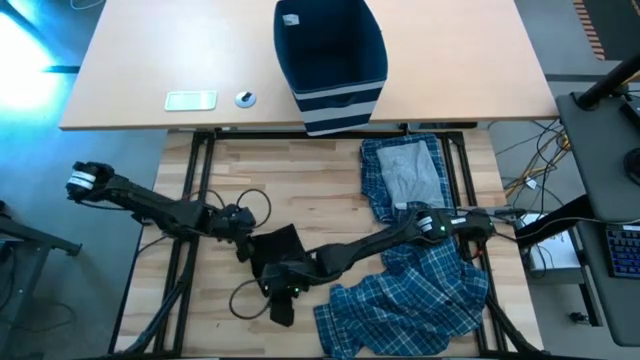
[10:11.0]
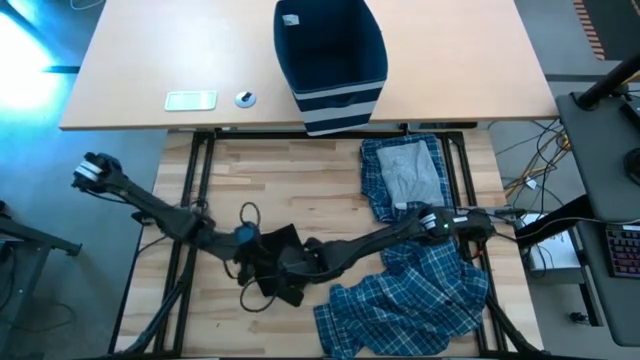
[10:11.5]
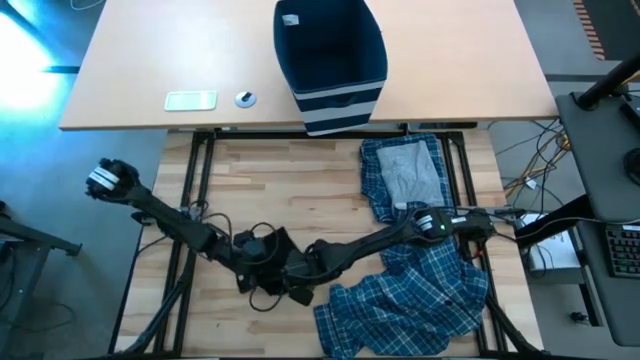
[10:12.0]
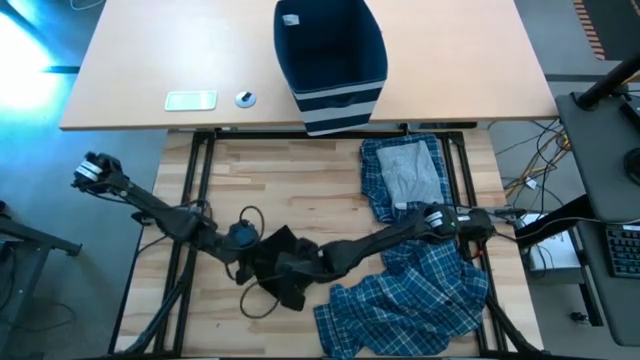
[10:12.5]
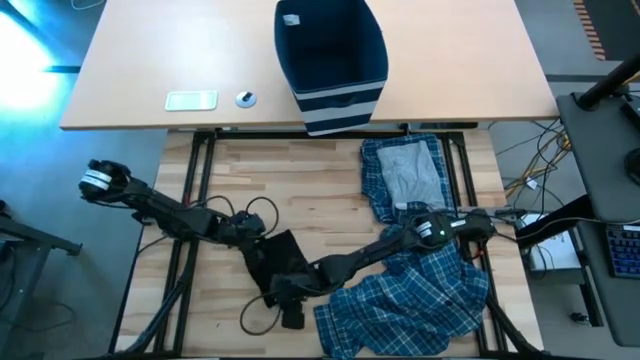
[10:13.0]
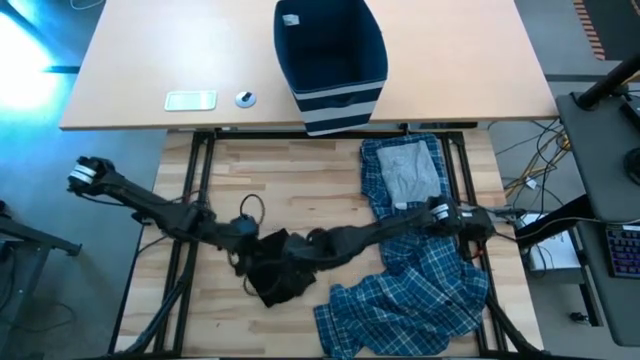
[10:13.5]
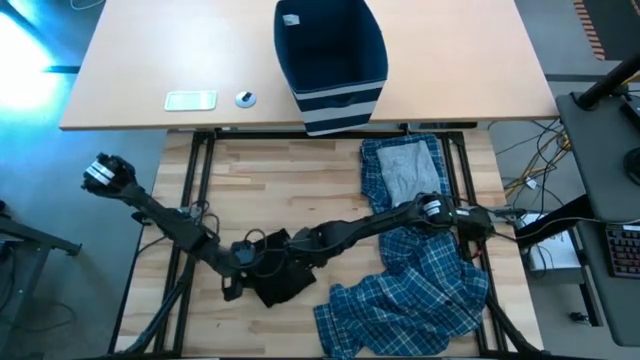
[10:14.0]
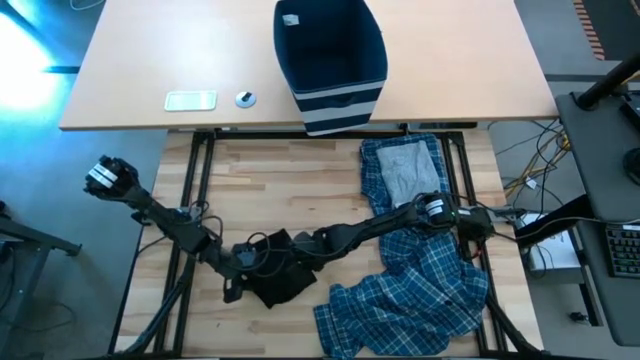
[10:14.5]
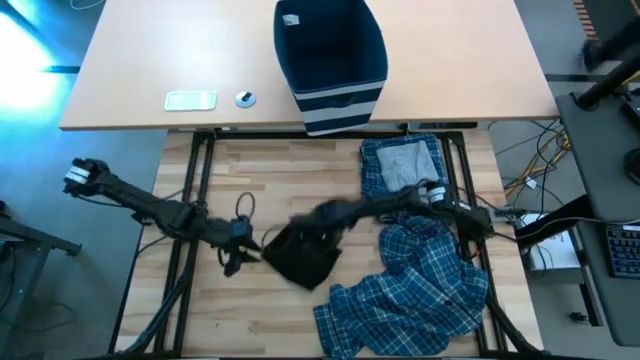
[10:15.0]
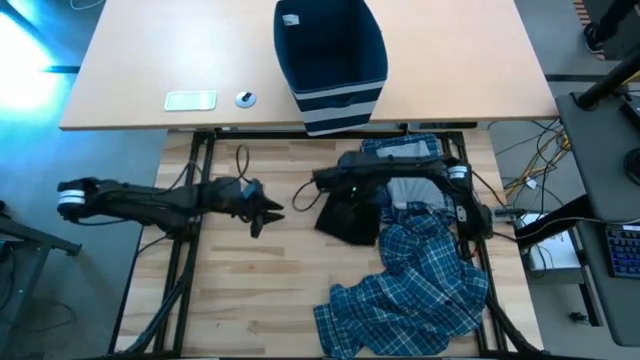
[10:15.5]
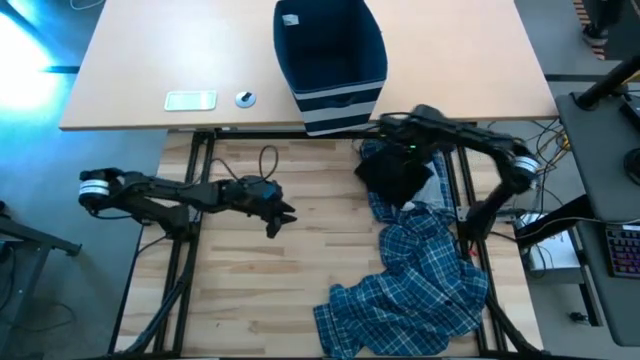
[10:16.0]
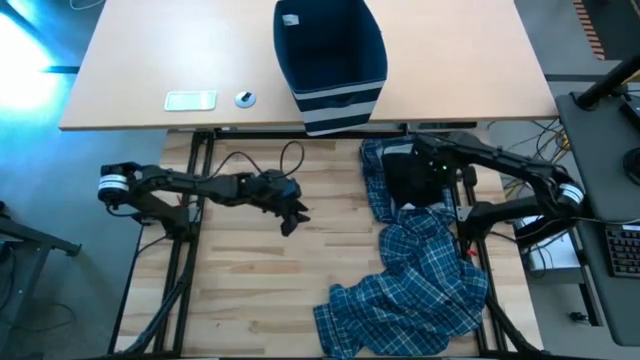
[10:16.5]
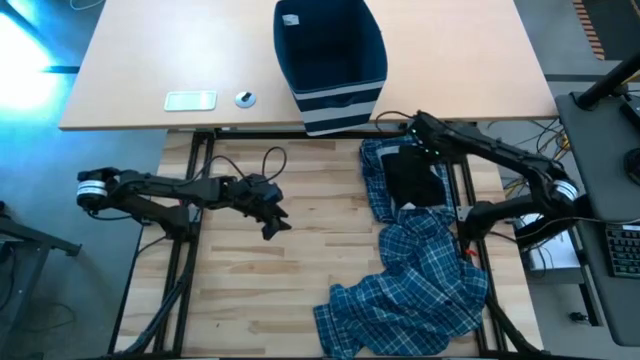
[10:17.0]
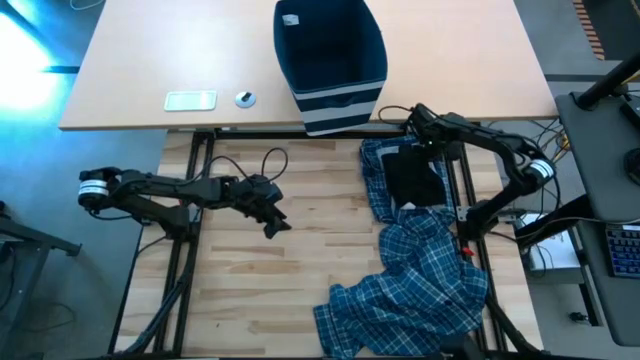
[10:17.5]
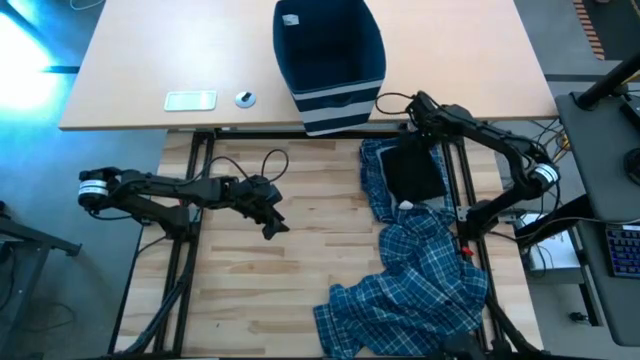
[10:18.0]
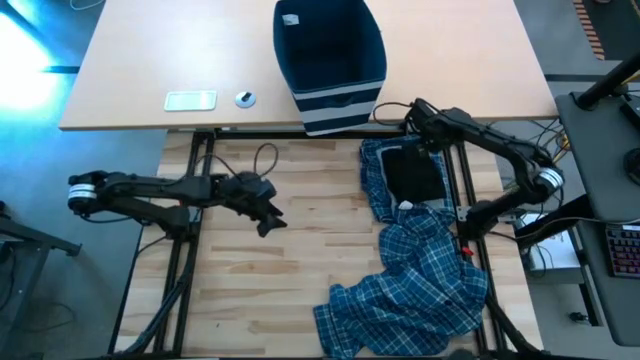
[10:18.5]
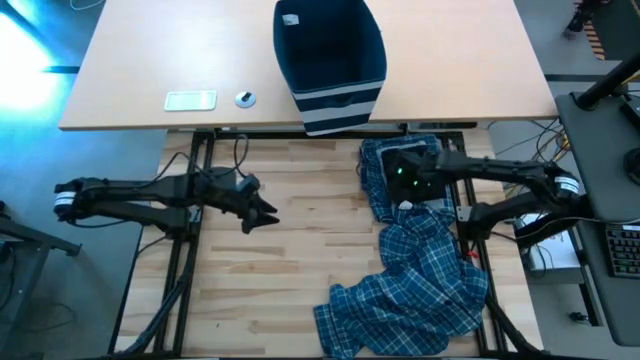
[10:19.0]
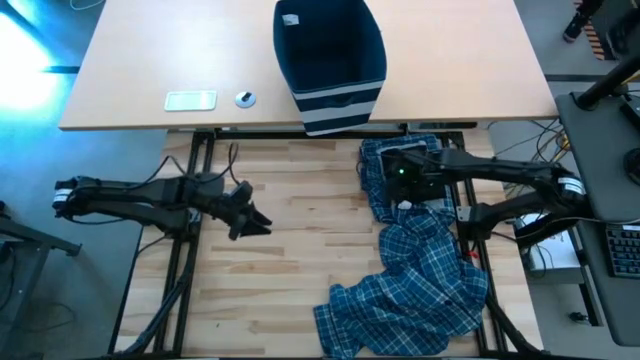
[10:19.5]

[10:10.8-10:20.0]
Task: Fold Laundry from Bin
Stack the black boxer on top of the gray shirt

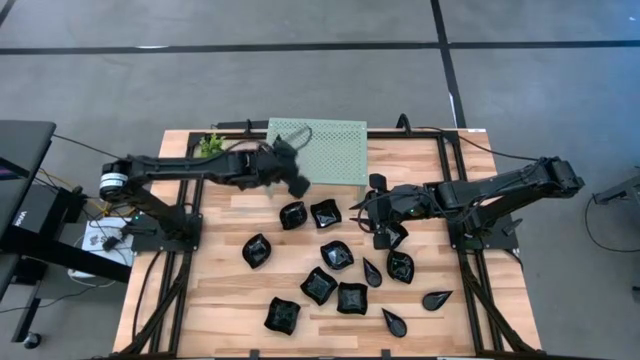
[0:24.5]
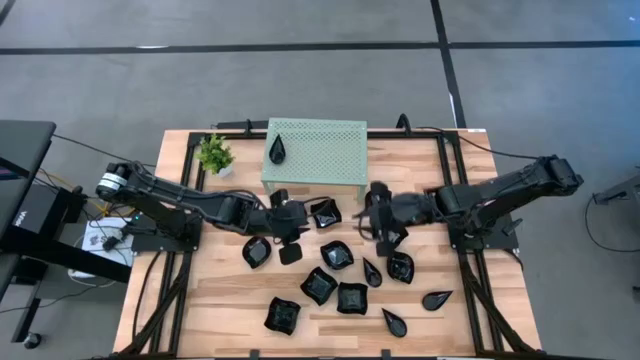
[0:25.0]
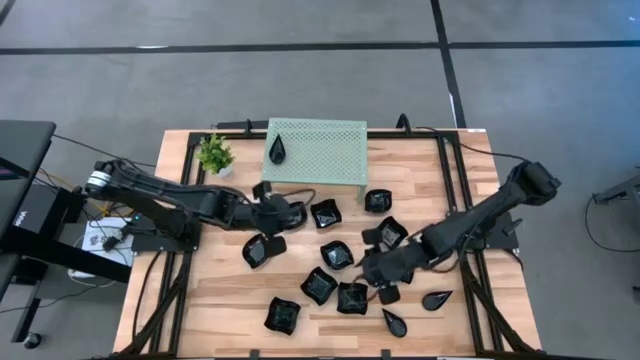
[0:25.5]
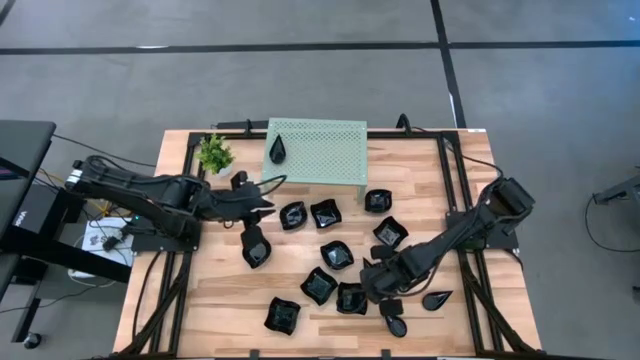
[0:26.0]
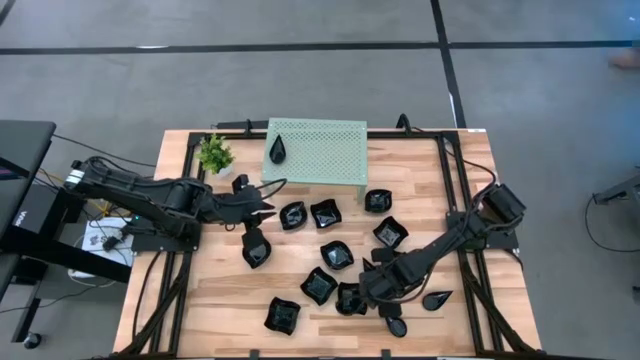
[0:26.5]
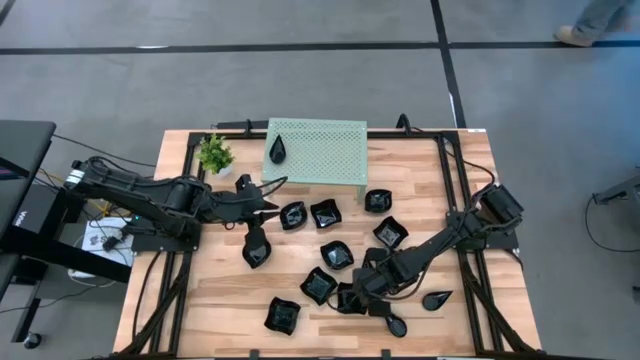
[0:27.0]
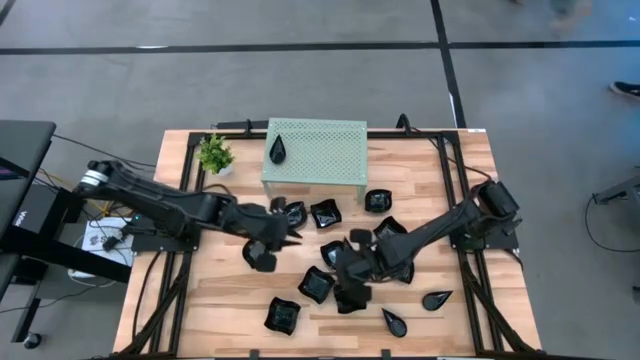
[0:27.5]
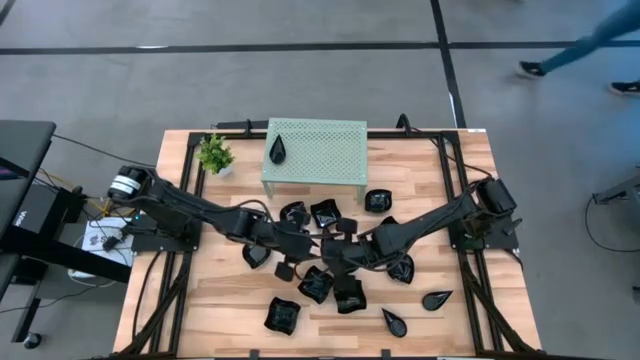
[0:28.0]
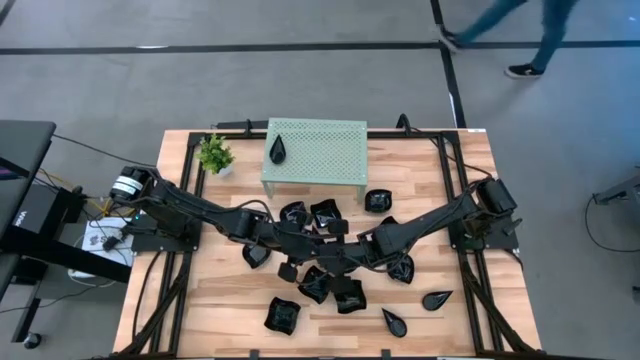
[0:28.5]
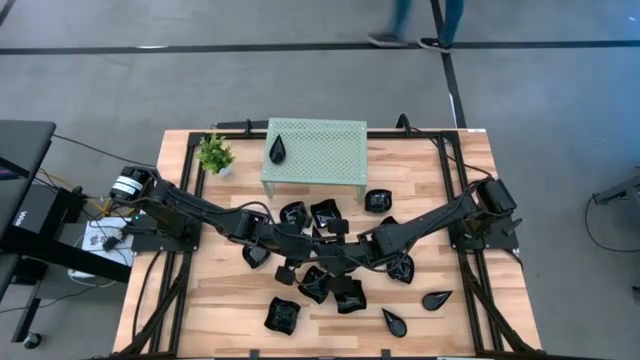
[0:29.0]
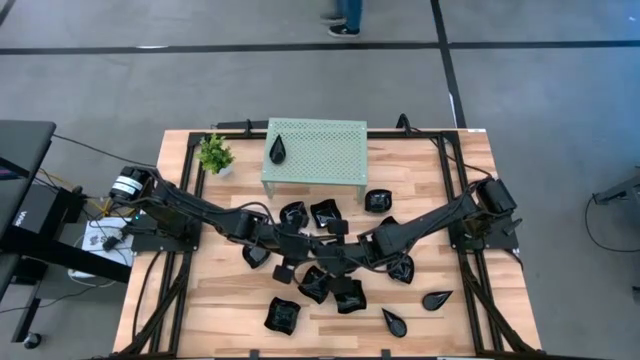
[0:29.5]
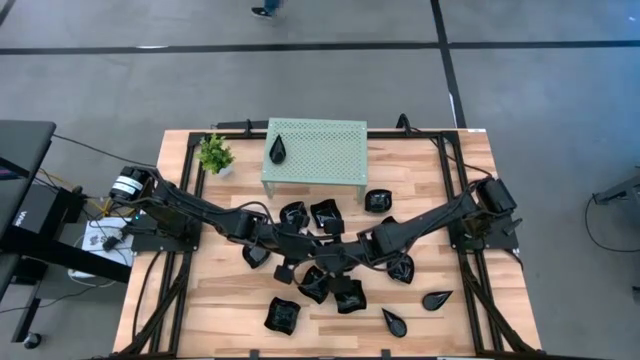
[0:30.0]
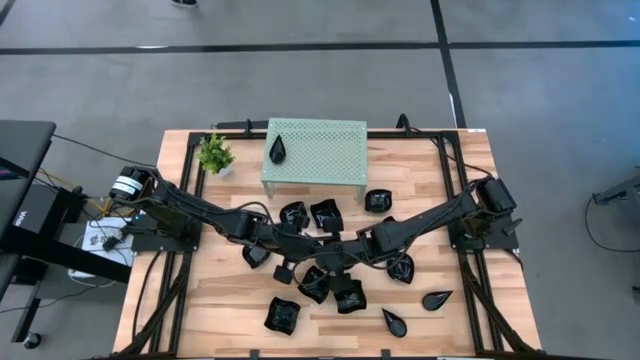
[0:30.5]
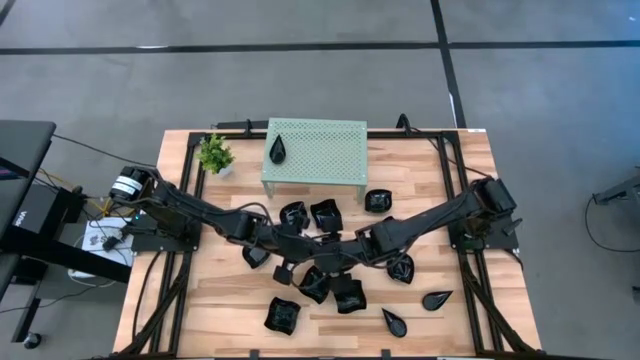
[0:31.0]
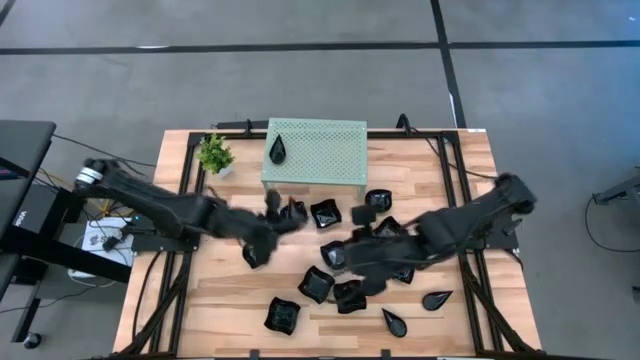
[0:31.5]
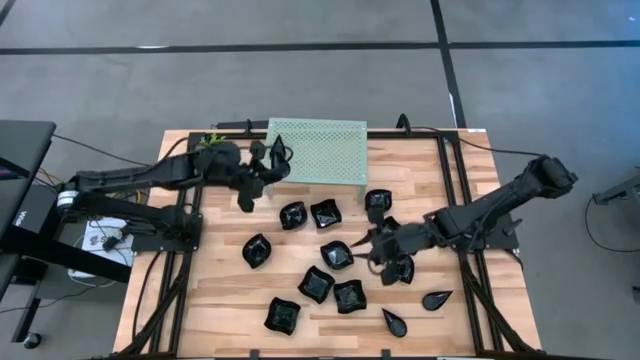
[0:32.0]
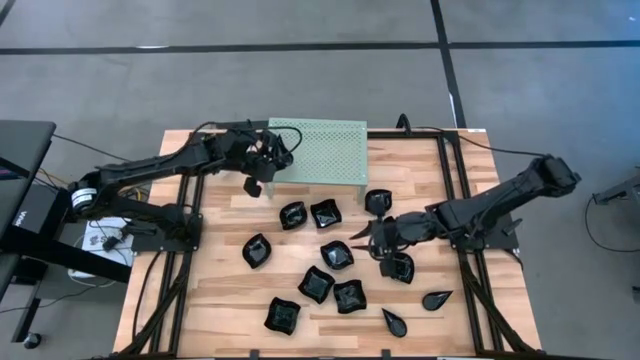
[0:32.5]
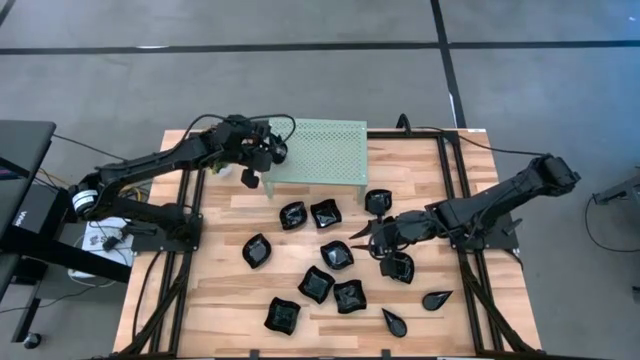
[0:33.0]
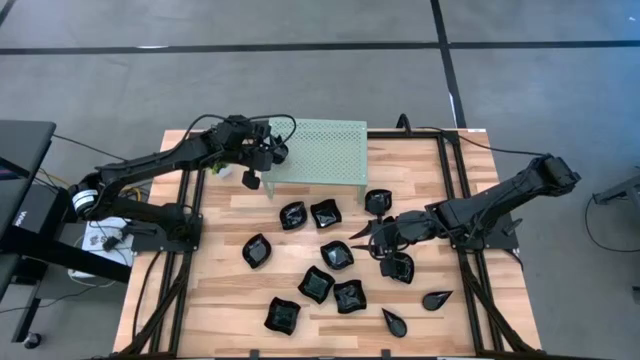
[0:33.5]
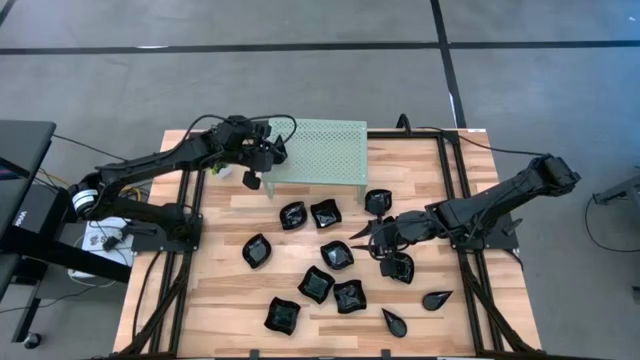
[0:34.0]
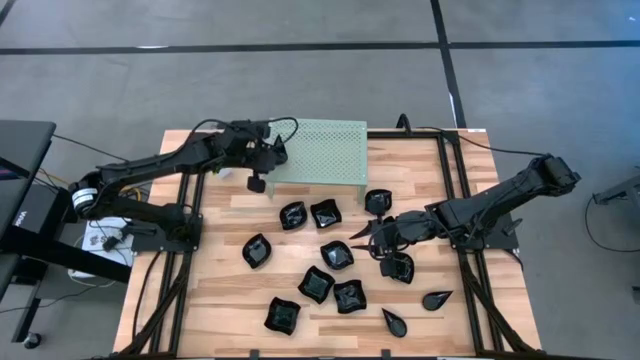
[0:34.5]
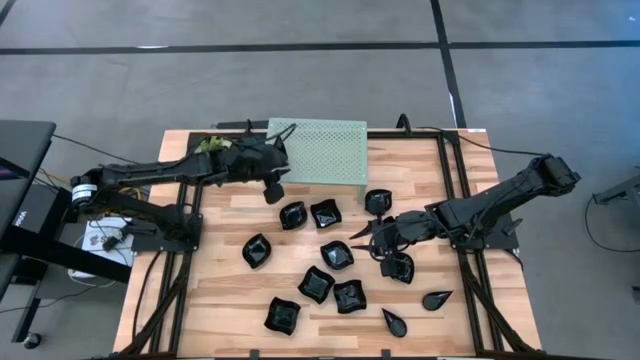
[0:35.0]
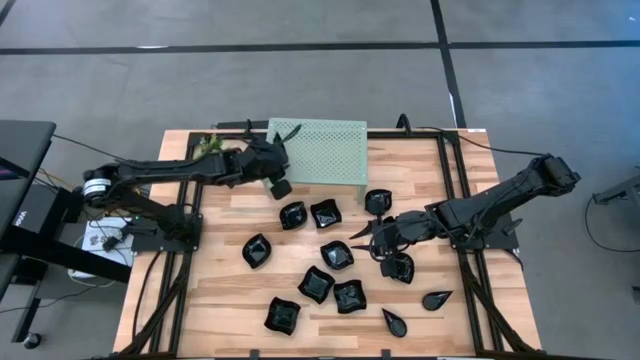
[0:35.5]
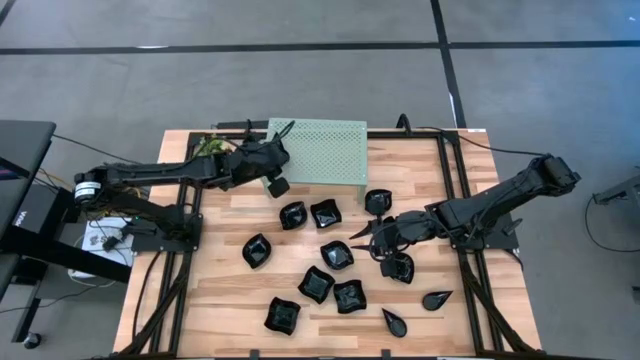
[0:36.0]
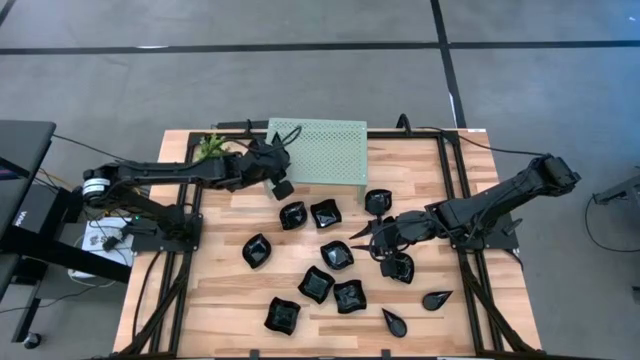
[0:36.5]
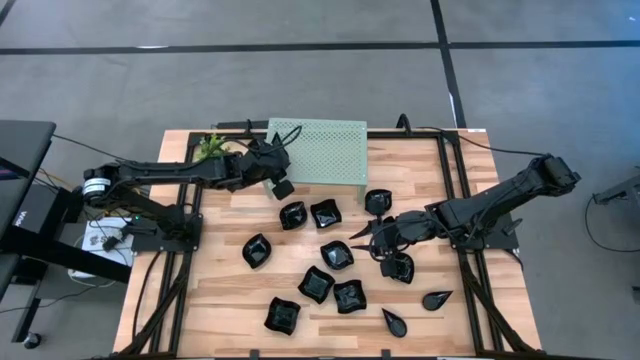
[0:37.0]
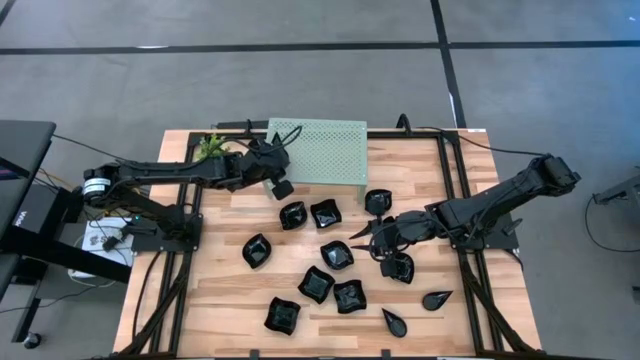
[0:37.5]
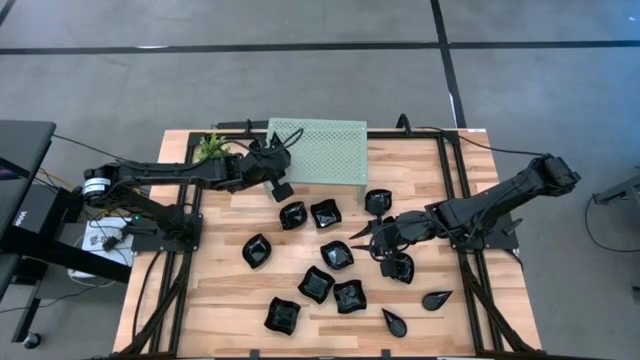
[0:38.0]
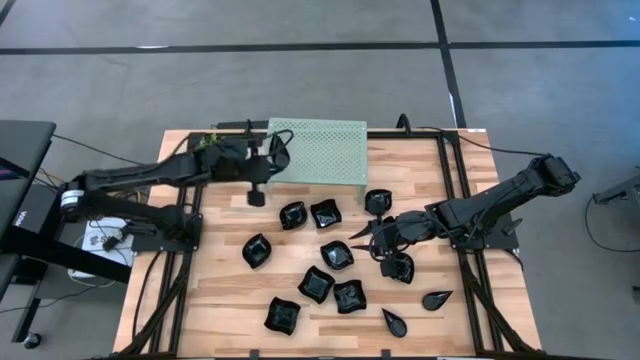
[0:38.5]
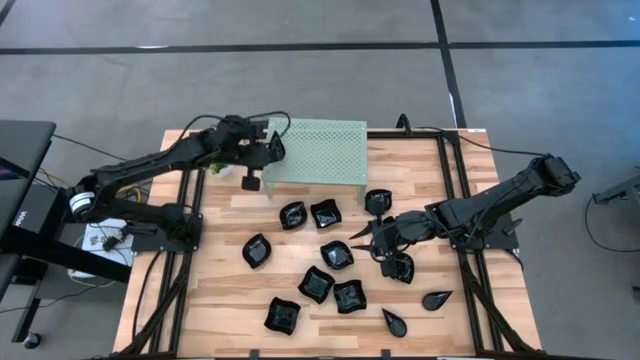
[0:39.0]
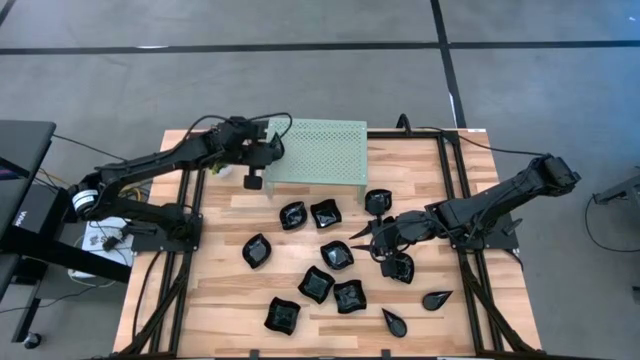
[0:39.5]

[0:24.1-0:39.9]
Task: Pick & Place Mini shaped plates
Stack the drop shaped plate on top of the other drop shaped plate on the shelf
